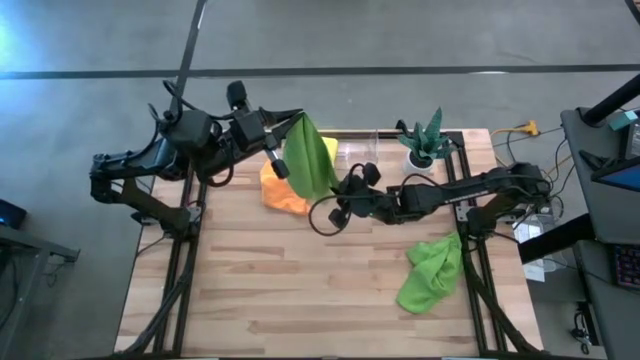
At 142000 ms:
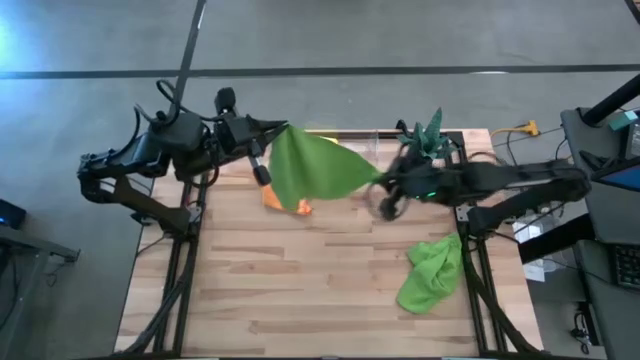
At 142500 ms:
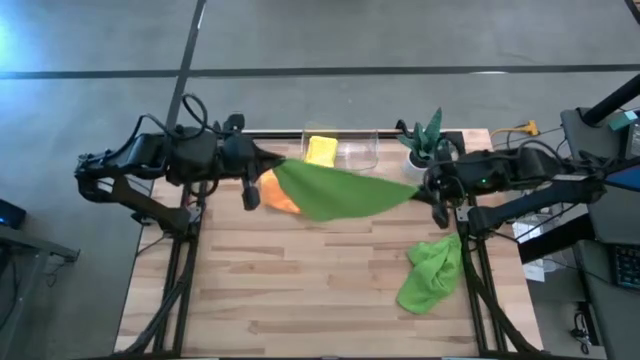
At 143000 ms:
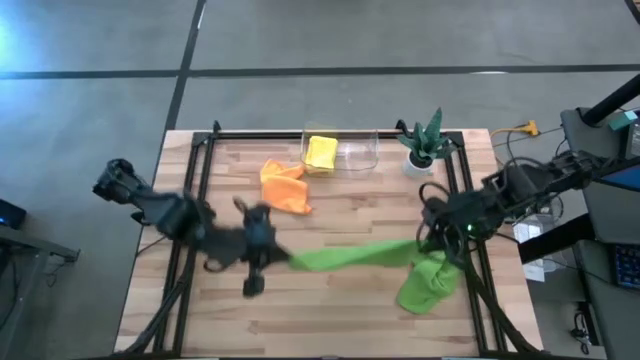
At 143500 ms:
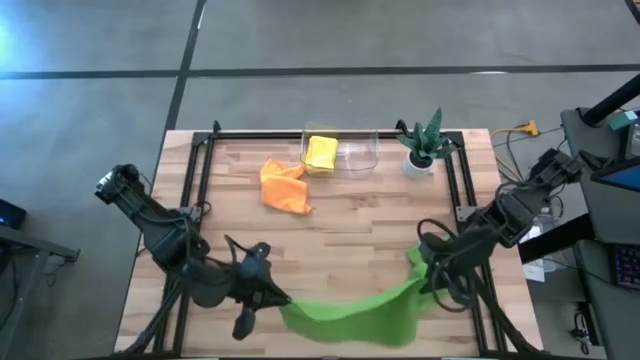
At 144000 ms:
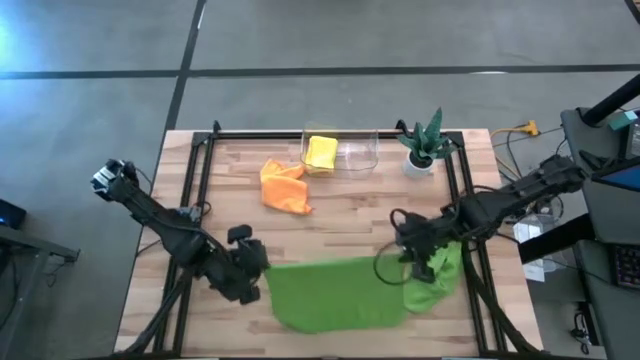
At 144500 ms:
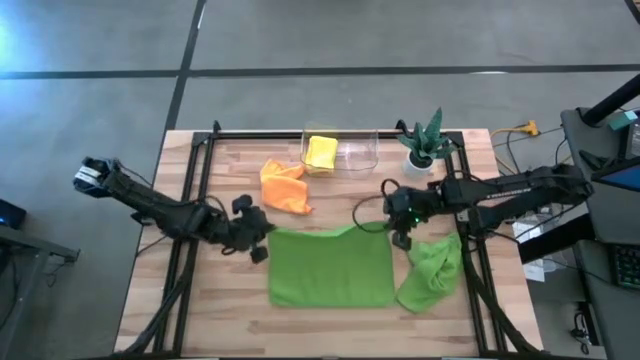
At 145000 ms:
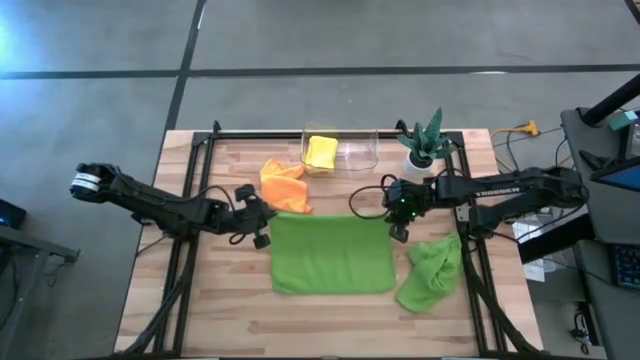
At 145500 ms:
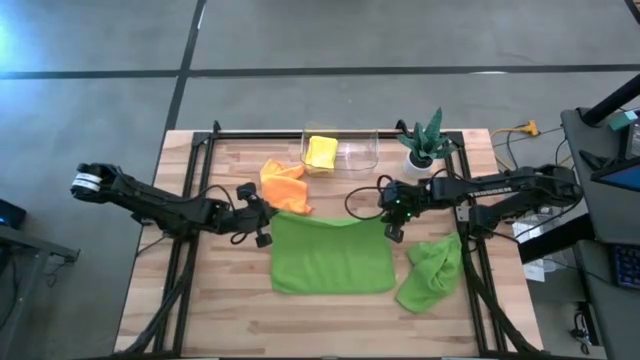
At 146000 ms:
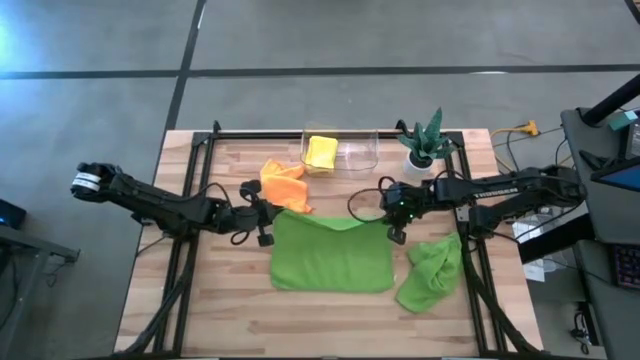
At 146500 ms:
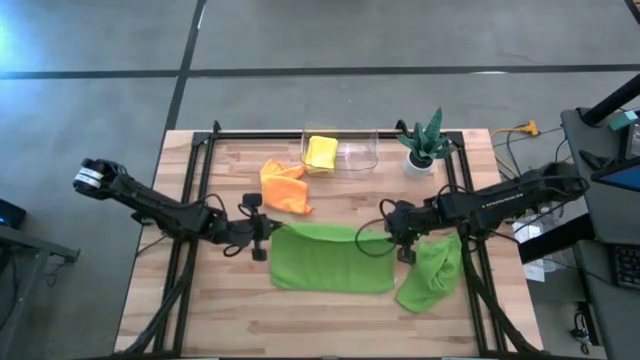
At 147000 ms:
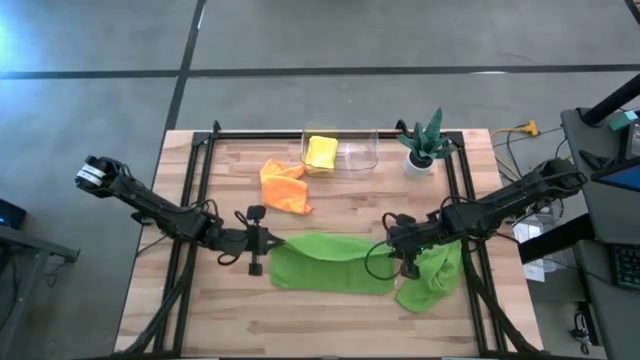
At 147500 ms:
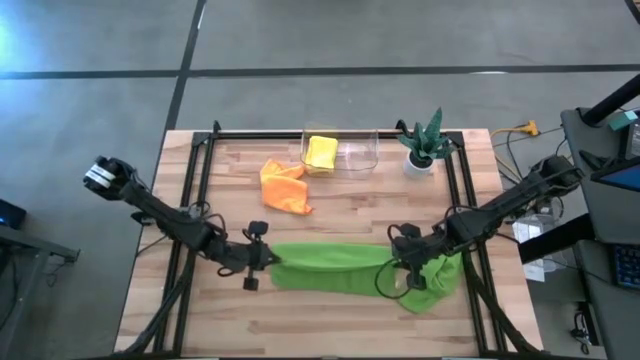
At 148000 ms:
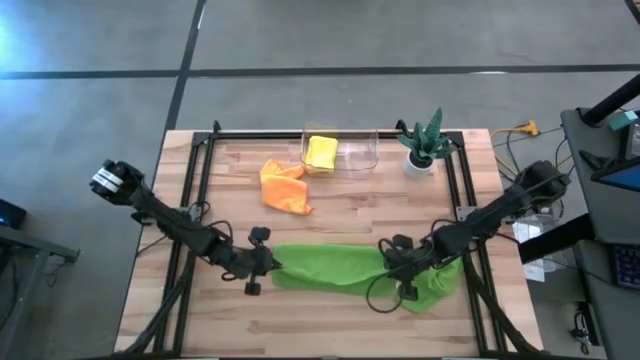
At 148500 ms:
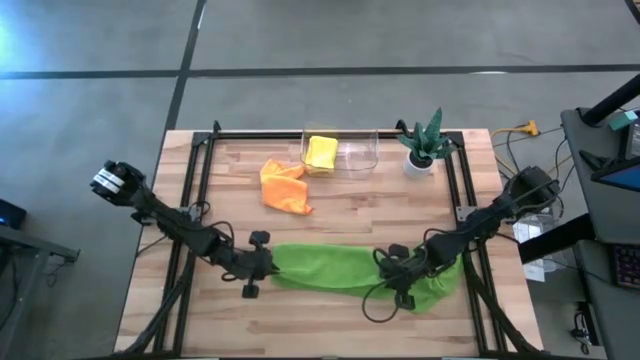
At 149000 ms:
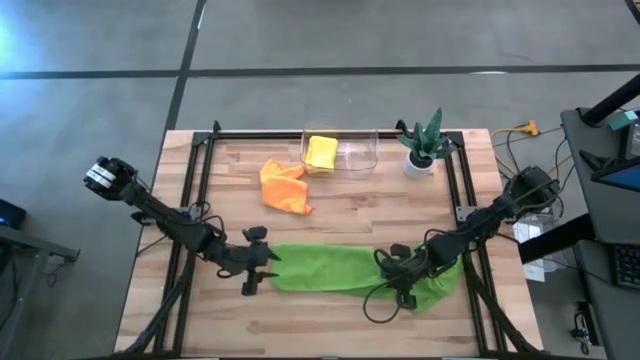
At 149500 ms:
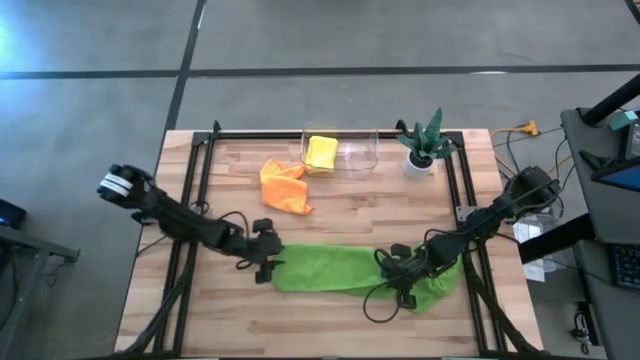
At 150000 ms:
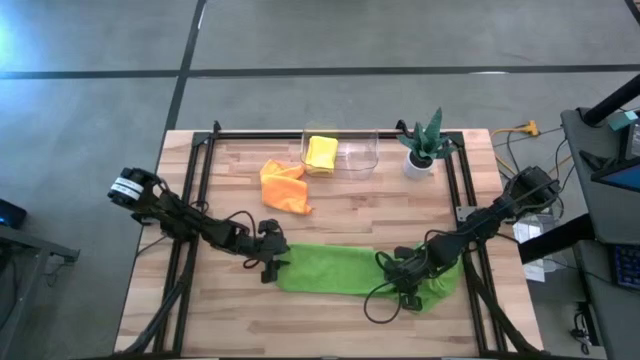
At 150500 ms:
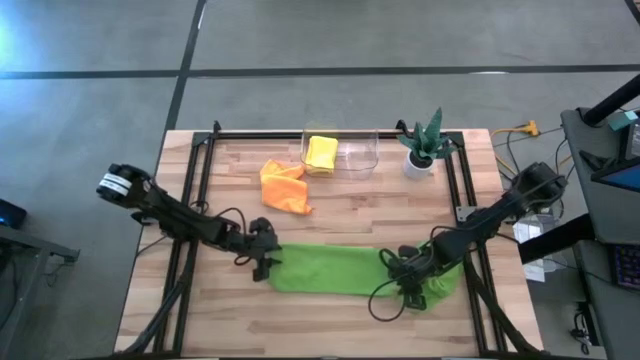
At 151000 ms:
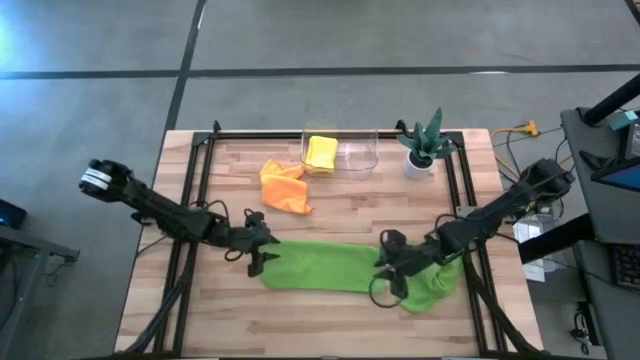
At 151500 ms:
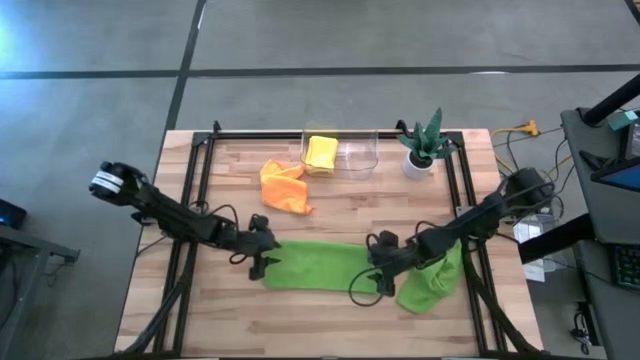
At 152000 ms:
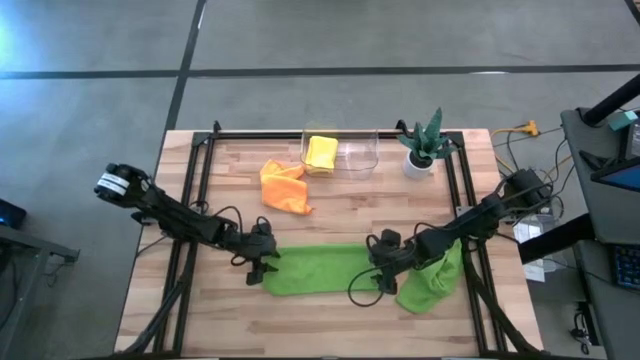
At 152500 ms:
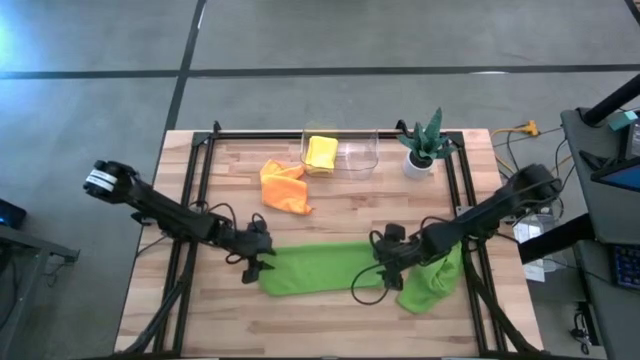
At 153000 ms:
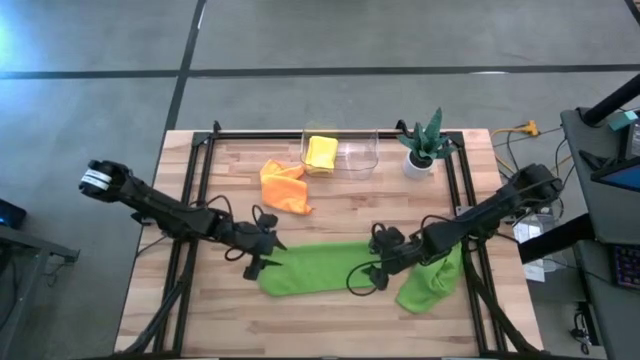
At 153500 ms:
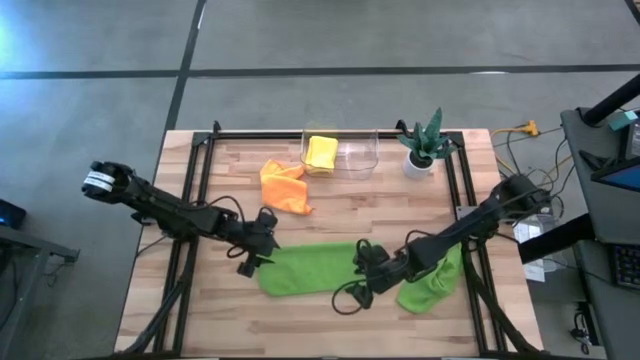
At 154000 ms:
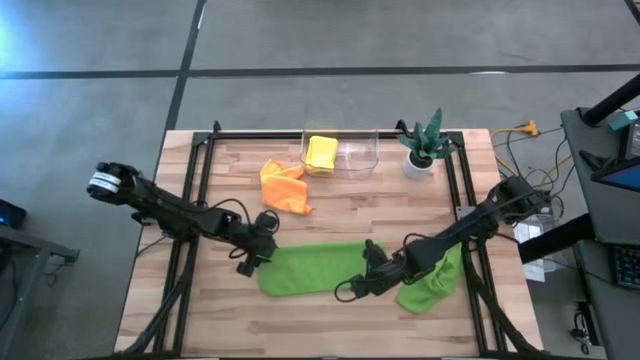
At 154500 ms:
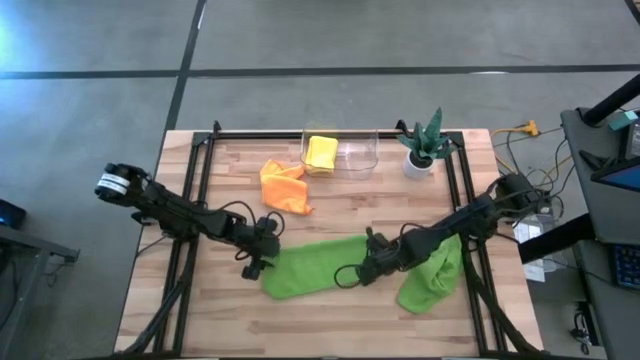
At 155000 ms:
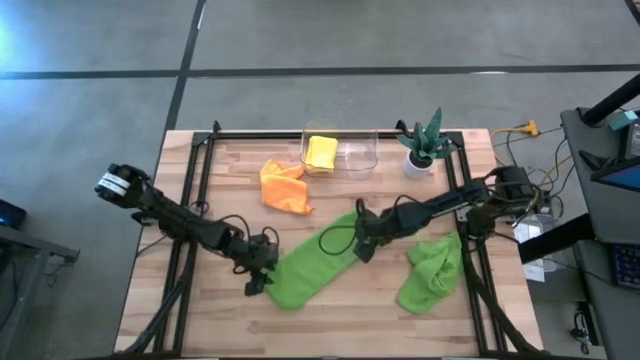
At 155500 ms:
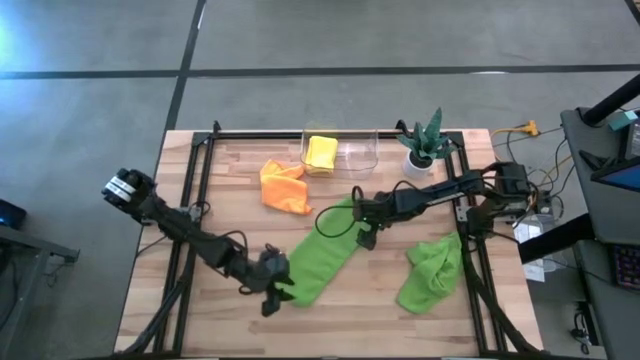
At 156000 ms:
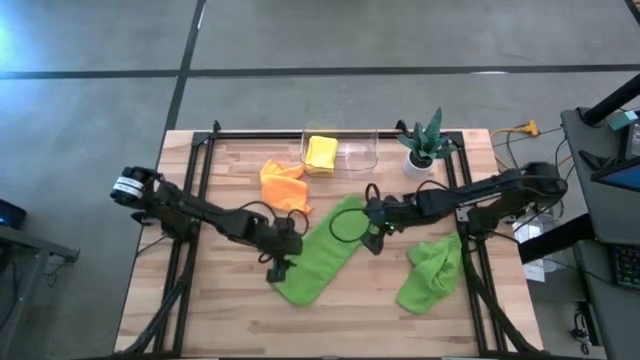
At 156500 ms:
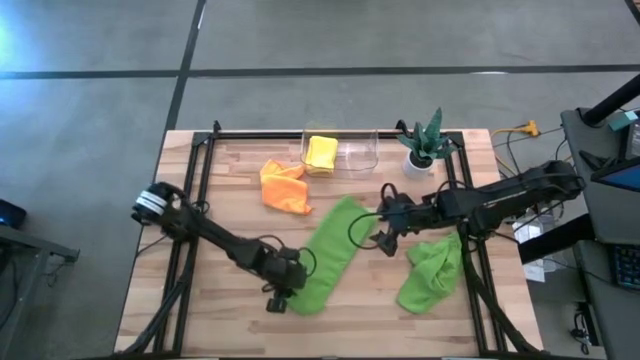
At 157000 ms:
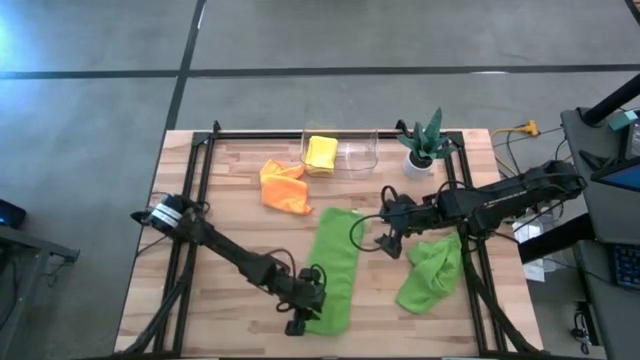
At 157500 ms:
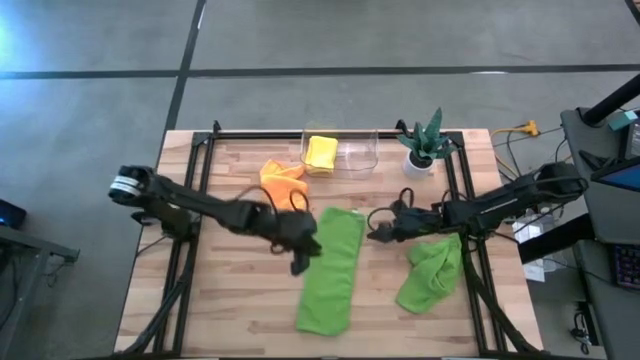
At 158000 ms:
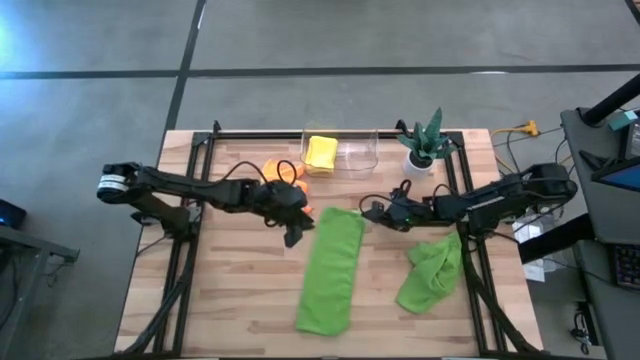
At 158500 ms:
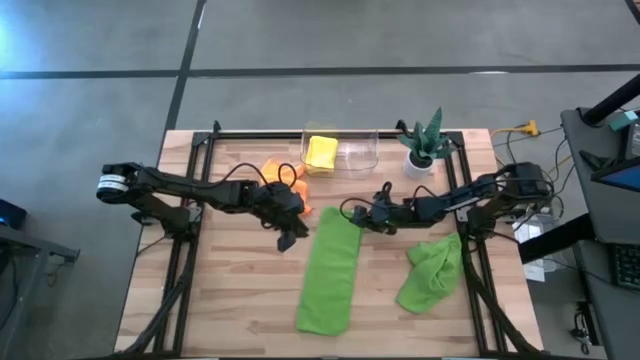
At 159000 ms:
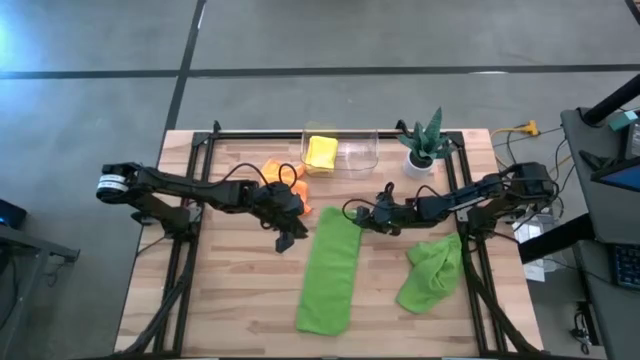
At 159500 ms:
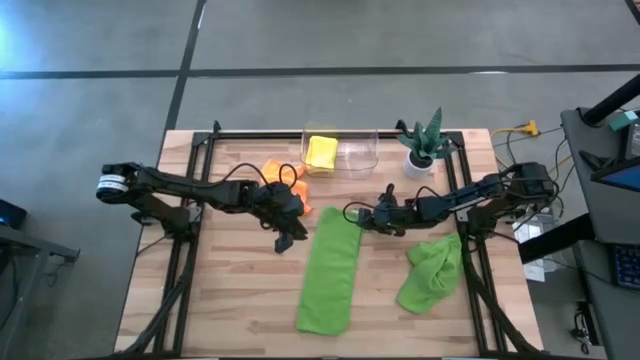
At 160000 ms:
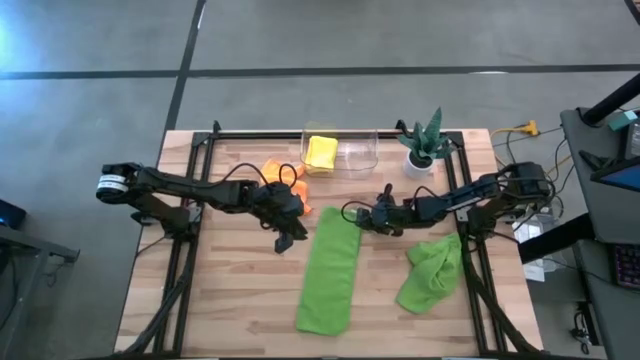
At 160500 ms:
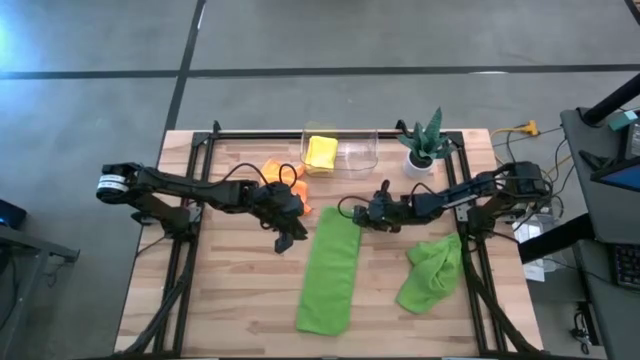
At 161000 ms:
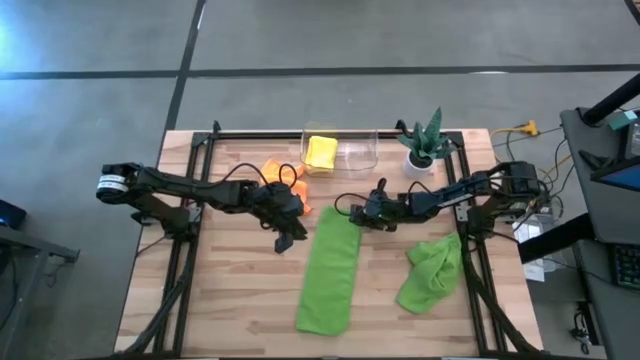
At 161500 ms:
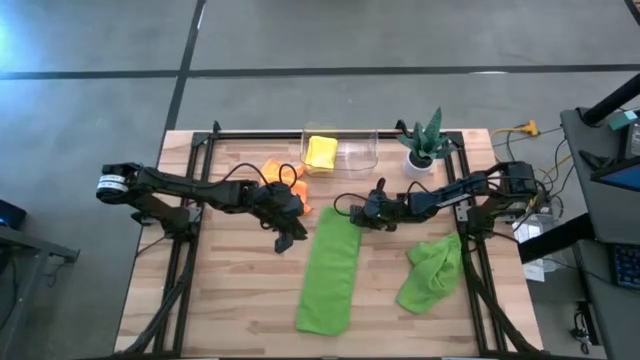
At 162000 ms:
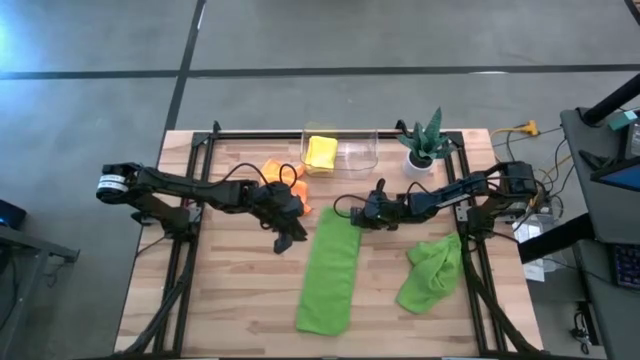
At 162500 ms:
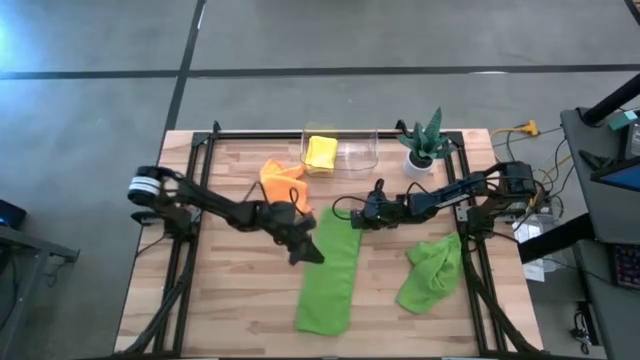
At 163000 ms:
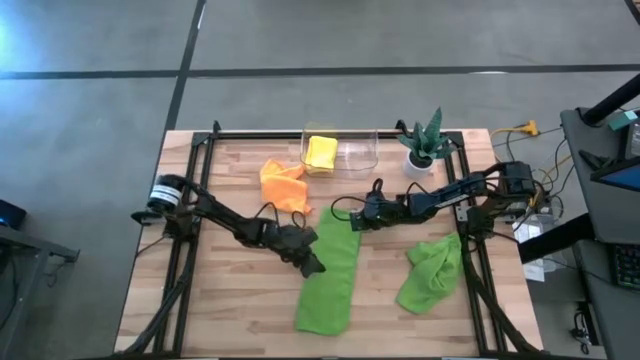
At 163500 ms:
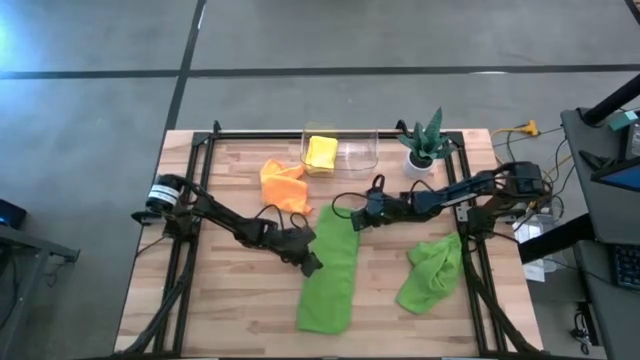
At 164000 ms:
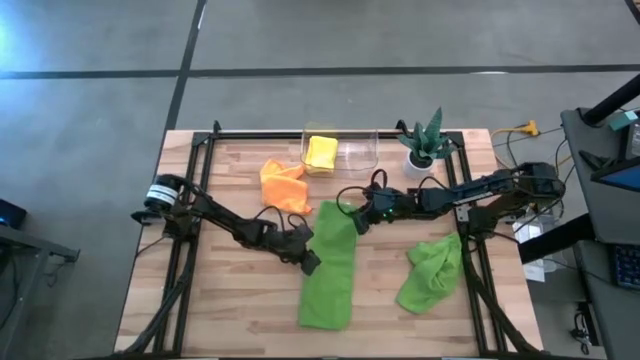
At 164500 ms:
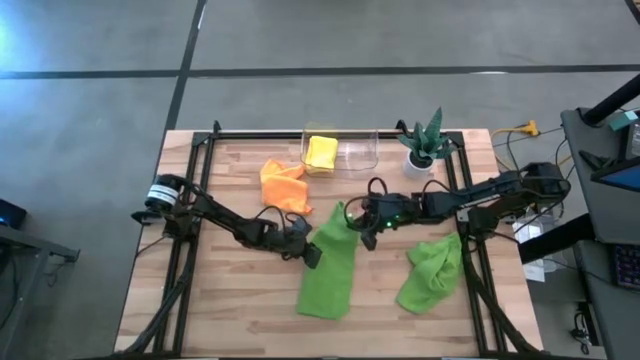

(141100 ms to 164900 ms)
Task: Fold microfiber towels
Fold the left green microfiber towel
